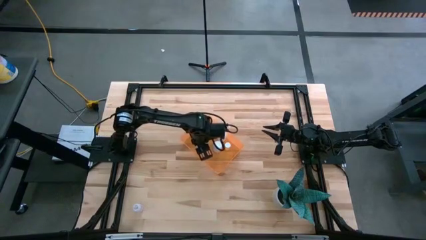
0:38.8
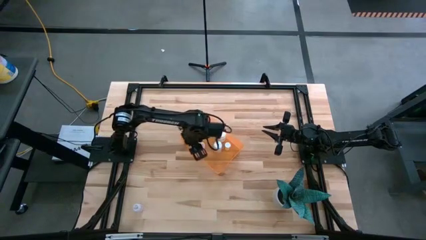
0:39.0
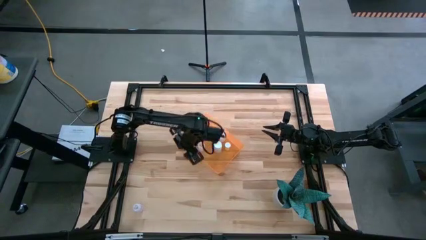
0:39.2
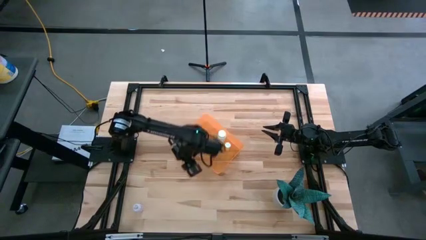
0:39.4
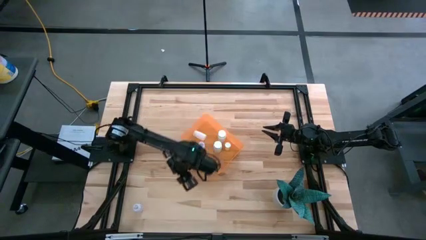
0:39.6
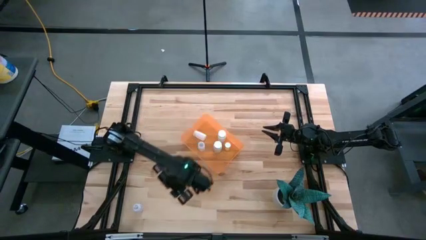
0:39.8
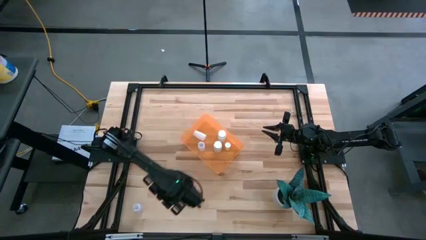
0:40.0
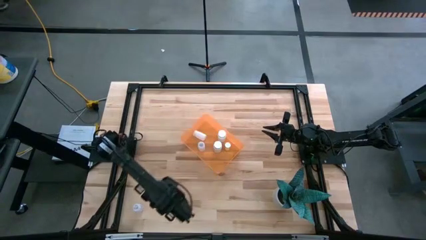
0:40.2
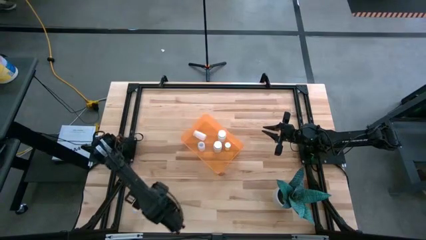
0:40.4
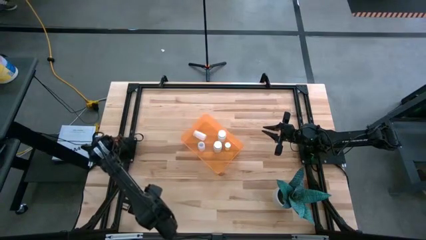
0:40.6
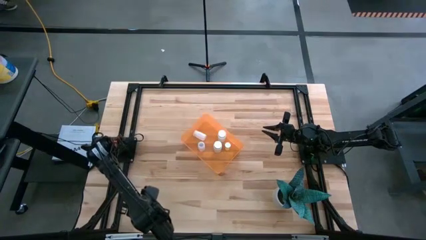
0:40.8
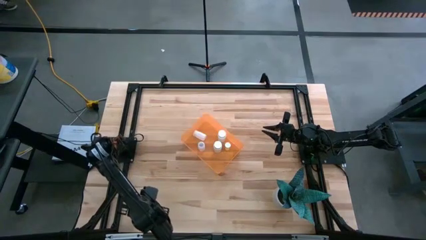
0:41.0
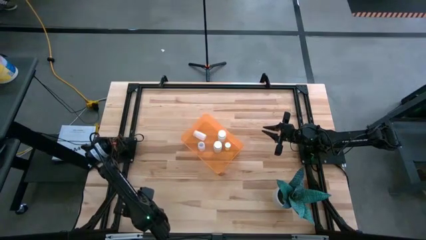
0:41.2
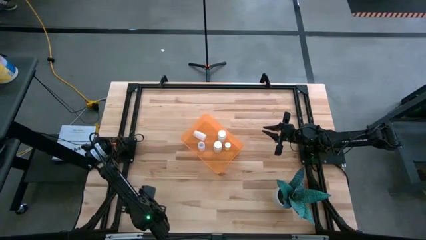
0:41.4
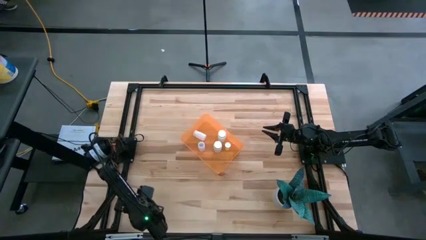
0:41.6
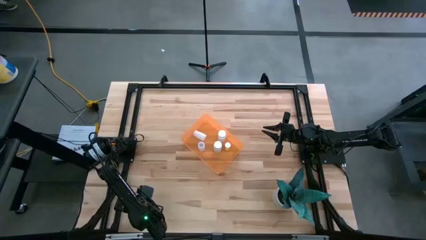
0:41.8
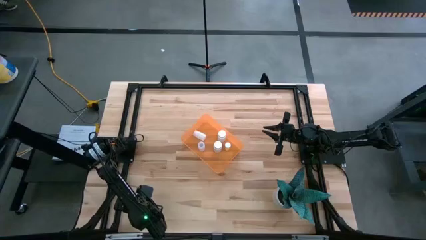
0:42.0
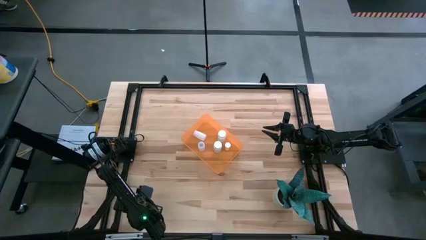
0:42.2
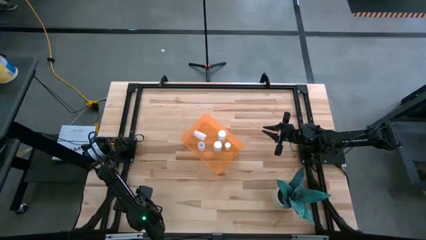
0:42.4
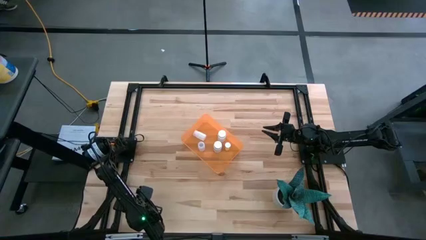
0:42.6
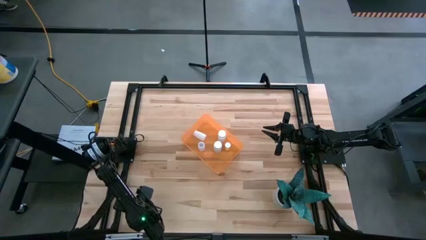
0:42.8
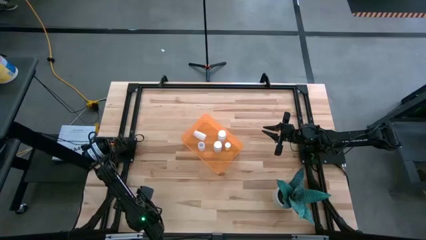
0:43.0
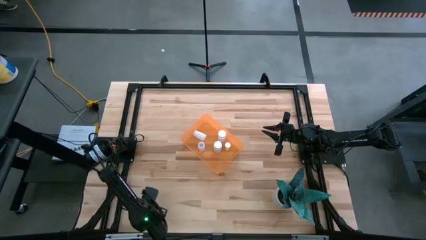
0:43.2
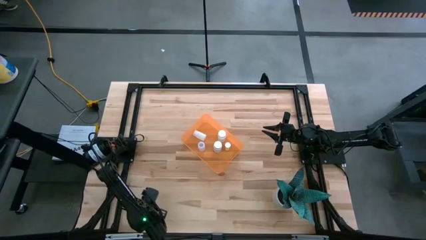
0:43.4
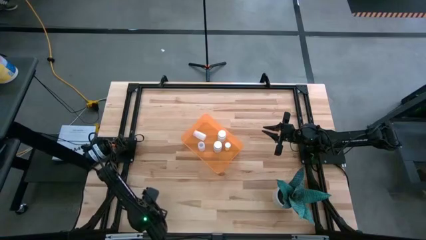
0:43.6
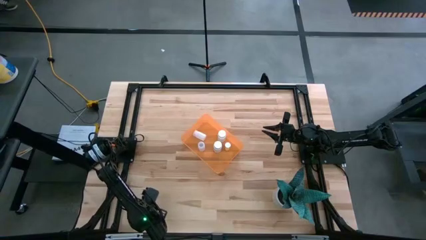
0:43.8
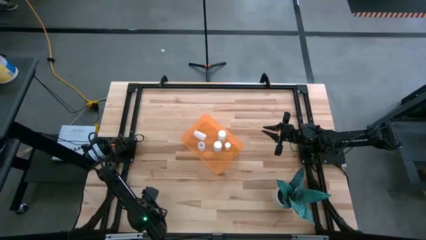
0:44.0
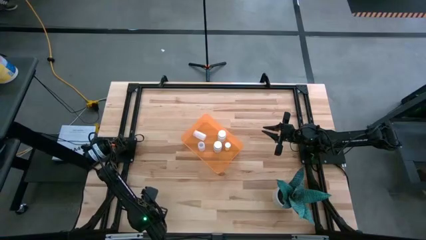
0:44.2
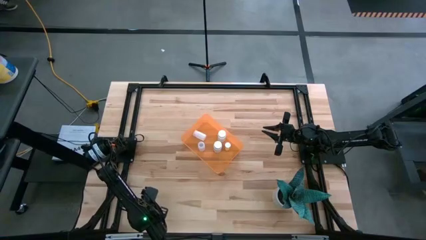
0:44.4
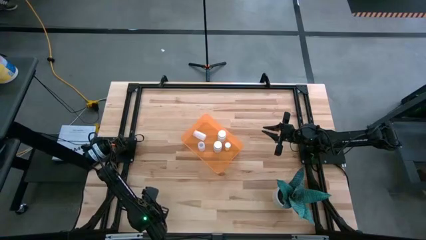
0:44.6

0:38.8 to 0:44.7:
Task: Pick and place pill bottles into a basket
Put the transparent pill bottle into the orange bin

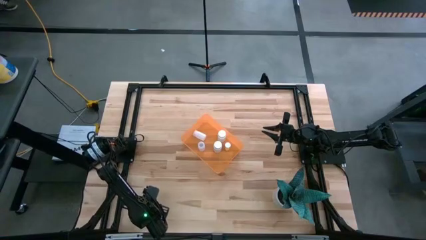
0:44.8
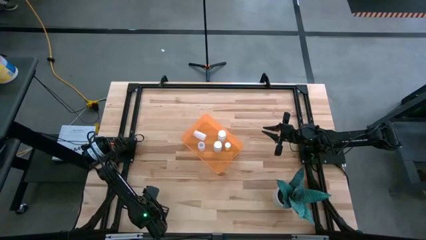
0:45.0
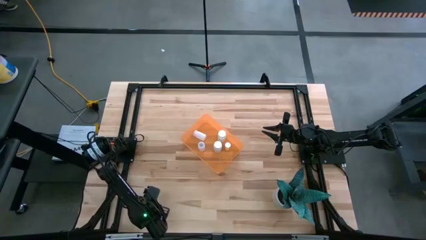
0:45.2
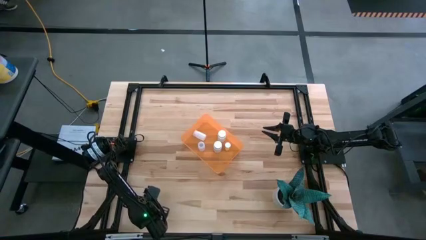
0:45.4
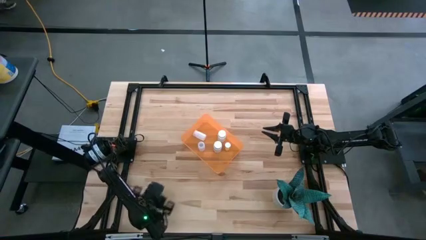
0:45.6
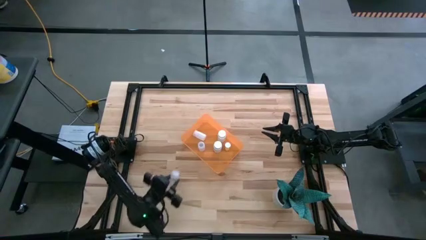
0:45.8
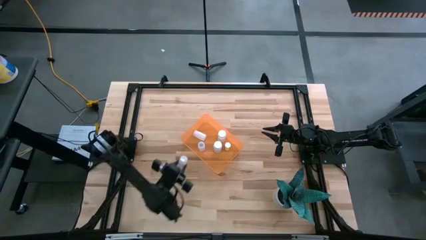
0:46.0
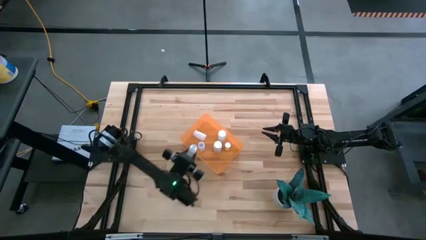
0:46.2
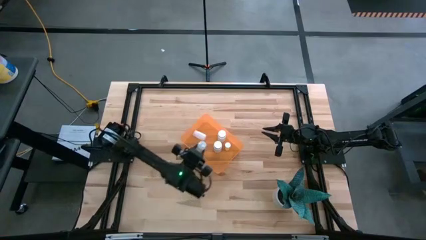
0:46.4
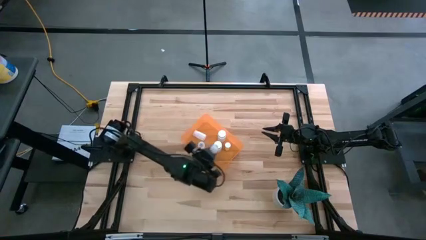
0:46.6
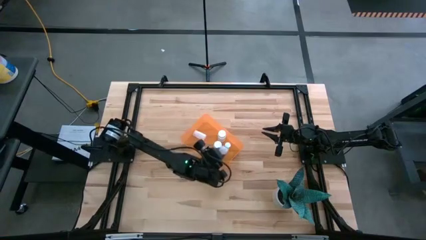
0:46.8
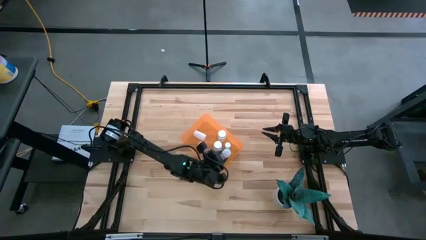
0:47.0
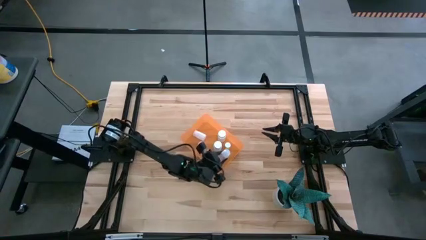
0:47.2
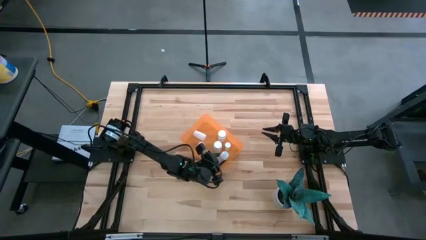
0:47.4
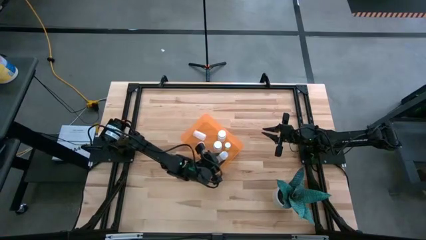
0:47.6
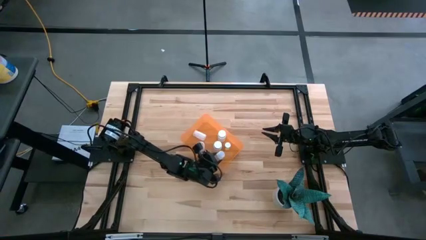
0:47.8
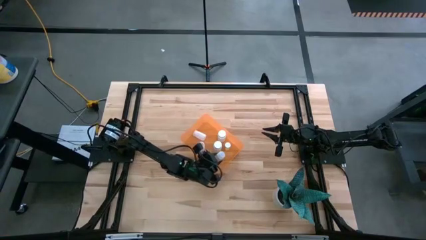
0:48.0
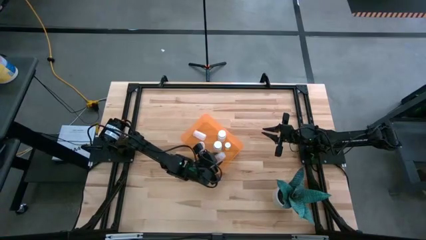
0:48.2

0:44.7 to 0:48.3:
Put the transparent pill bottle into the orange bin

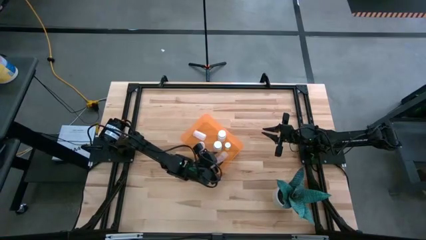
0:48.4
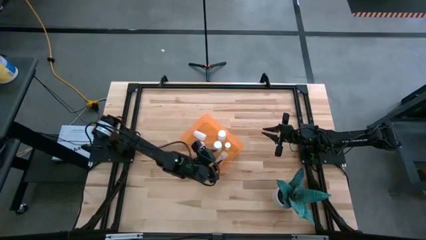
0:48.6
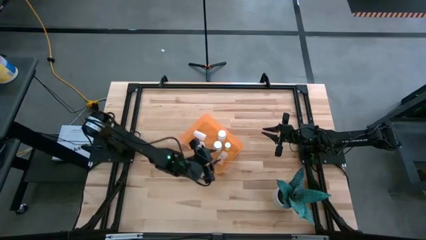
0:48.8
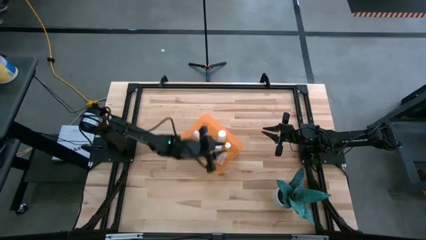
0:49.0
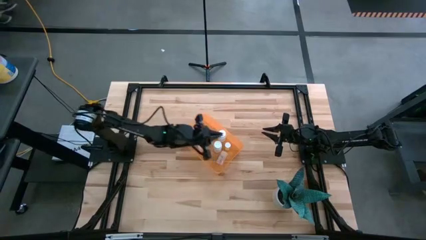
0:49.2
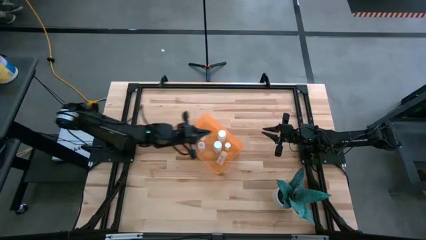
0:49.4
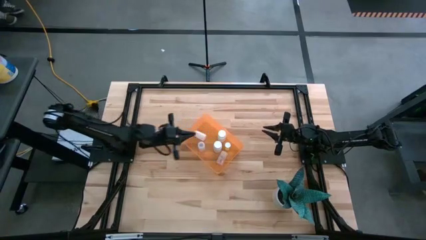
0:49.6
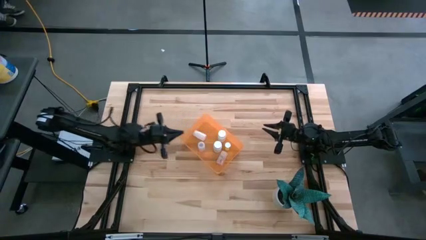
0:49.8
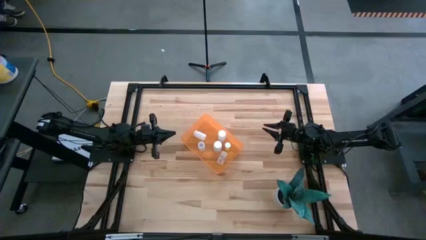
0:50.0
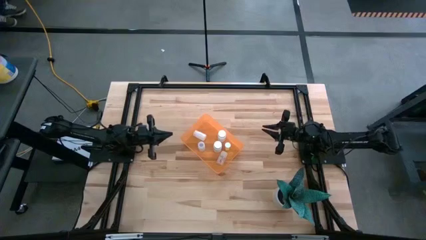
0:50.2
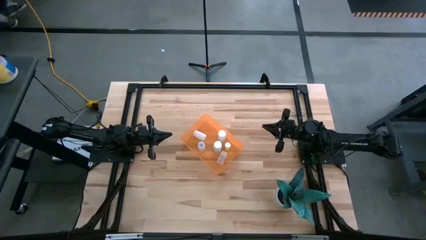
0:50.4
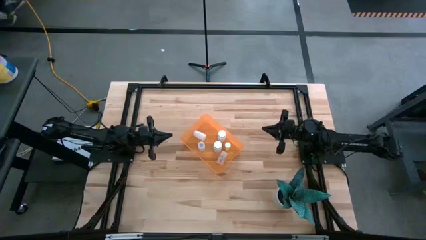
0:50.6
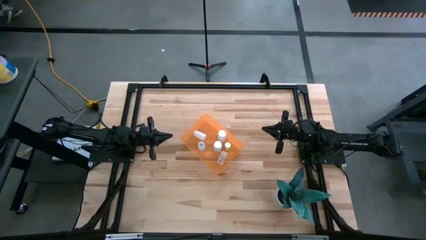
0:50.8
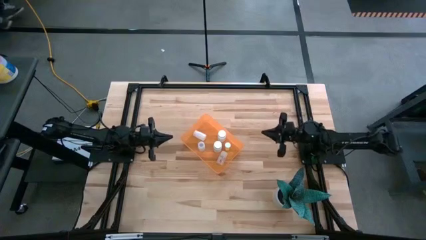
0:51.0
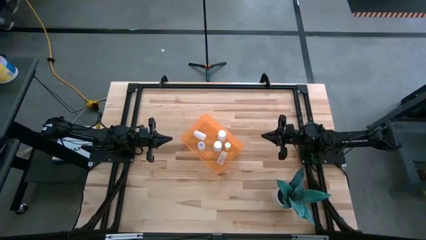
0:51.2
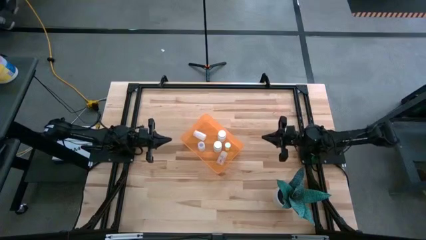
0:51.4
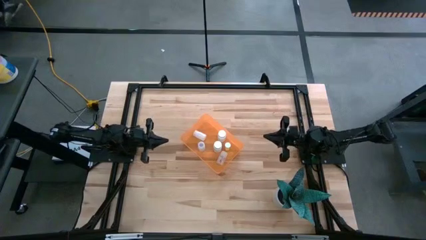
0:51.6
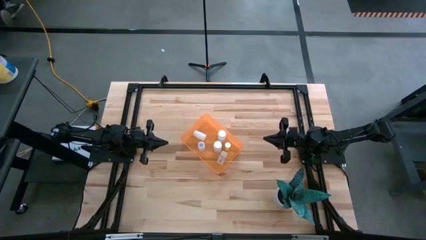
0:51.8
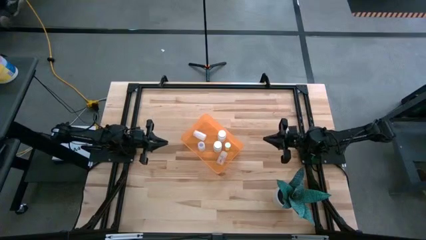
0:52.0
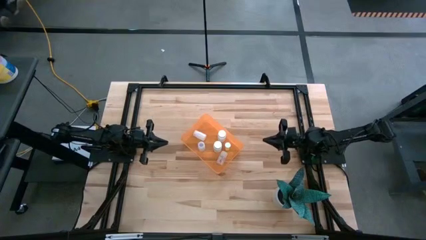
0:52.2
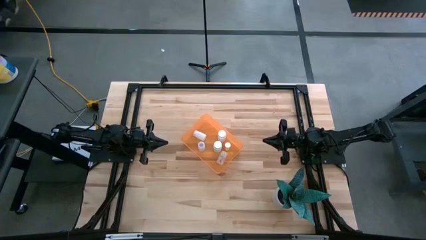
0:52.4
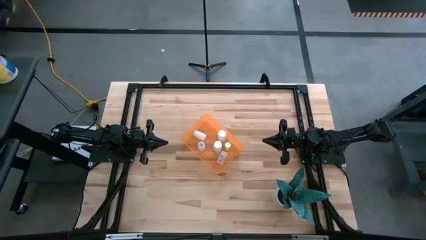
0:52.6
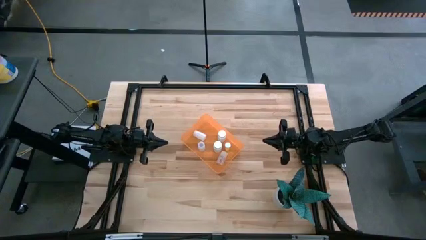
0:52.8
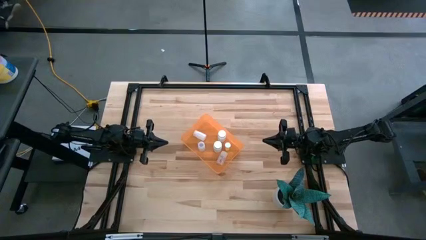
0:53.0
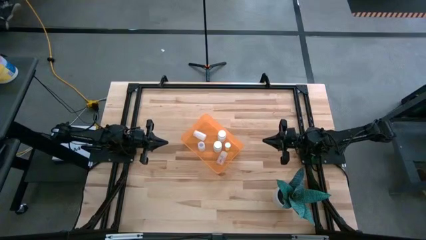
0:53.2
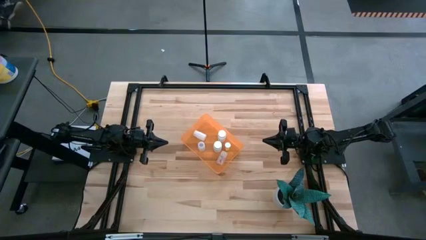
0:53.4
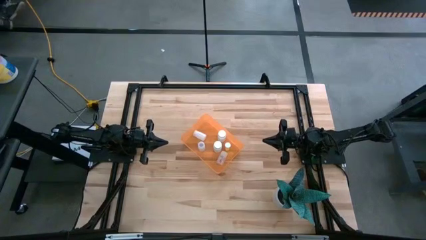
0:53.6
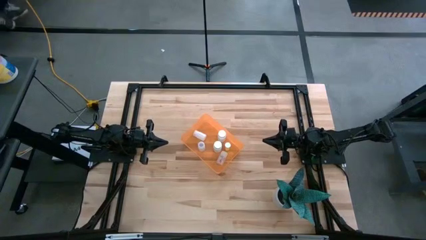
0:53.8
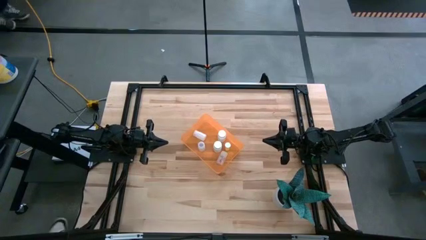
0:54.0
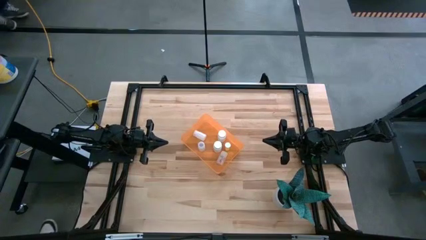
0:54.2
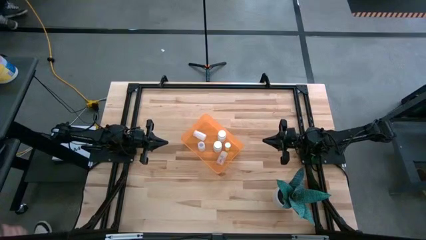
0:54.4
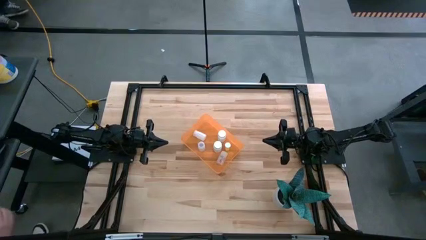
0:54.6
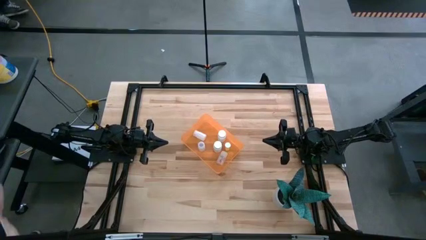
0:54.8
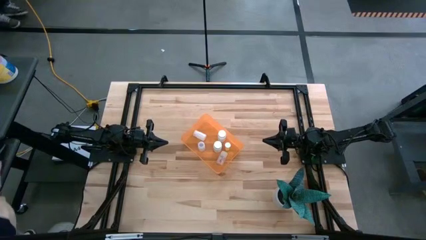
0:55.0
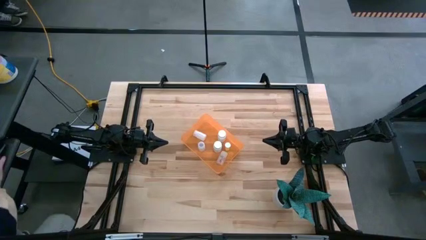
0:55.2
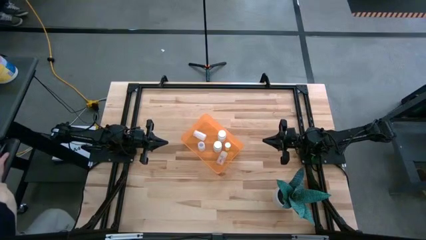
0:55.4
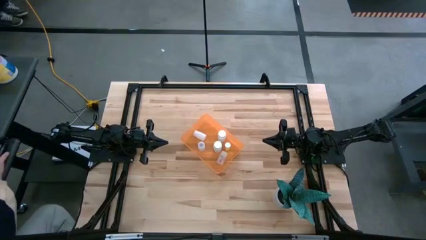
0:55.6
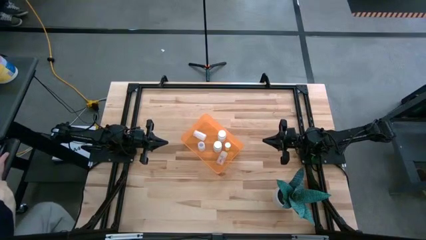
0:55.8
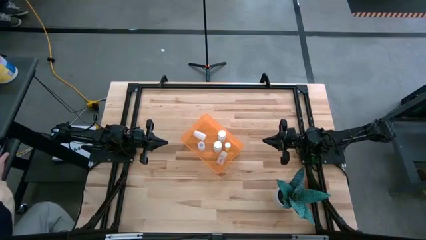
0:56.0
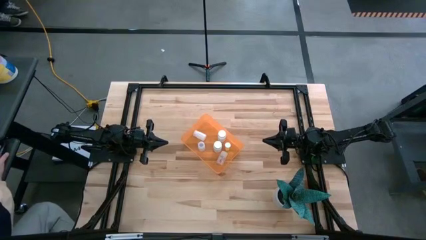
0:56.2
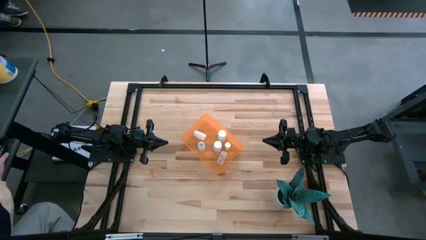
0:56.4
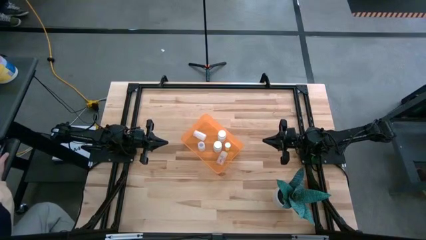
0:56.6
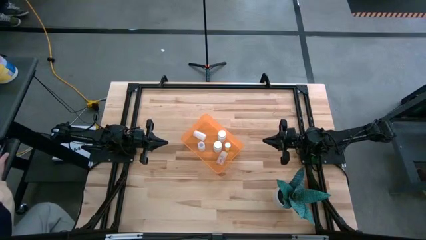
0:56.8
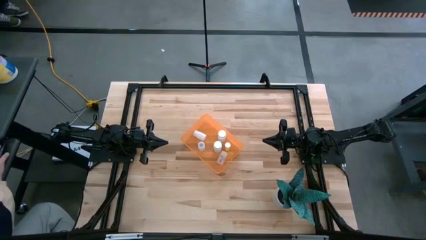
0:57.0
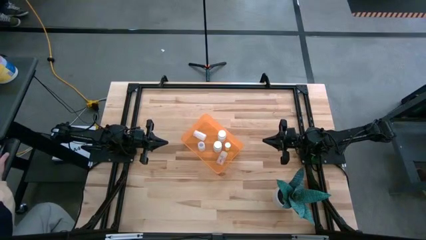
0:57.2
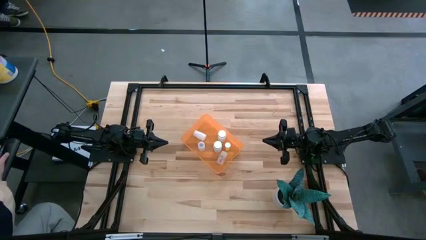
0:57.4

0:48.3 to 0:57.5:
Return to Home Position
